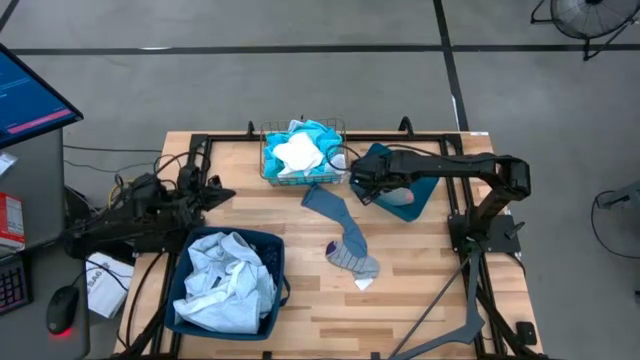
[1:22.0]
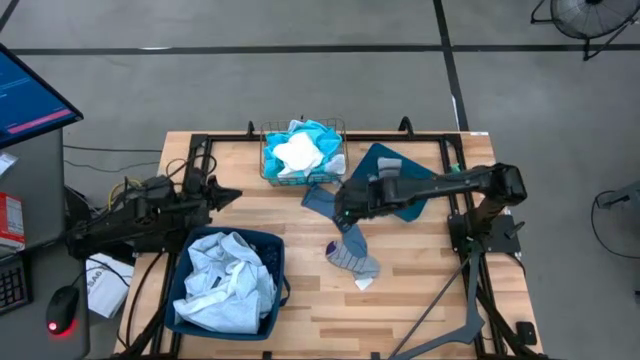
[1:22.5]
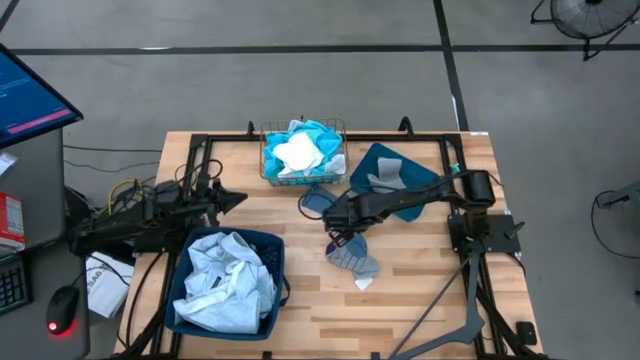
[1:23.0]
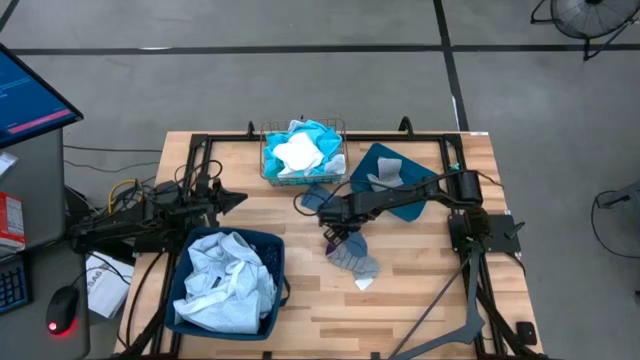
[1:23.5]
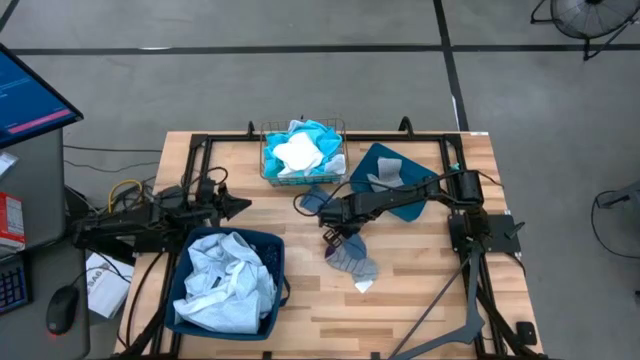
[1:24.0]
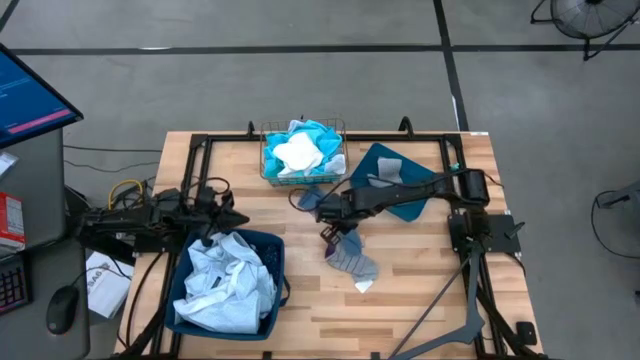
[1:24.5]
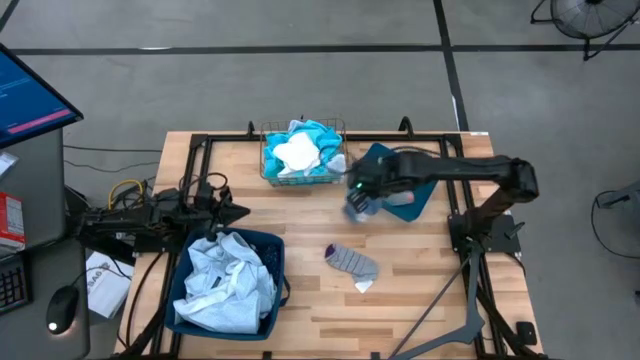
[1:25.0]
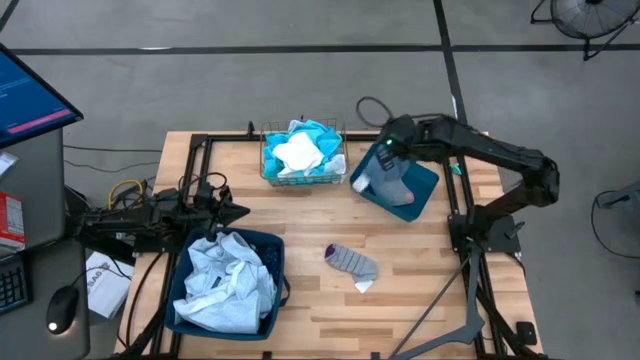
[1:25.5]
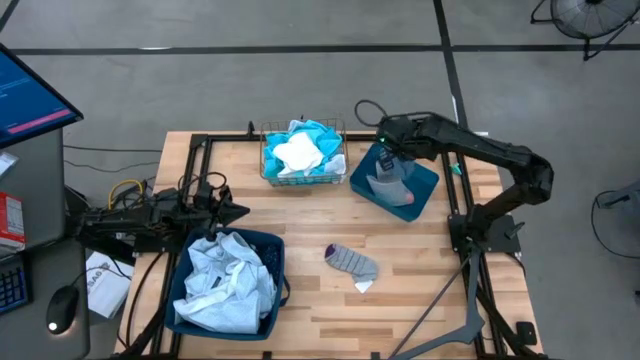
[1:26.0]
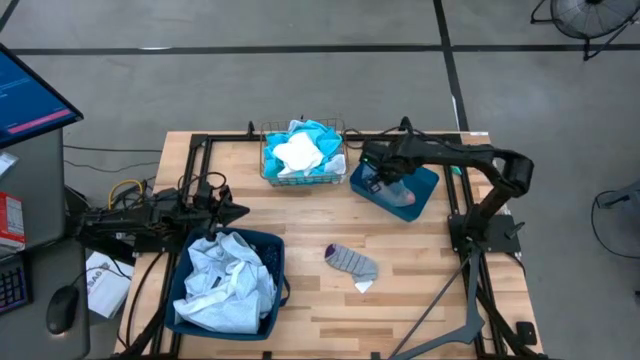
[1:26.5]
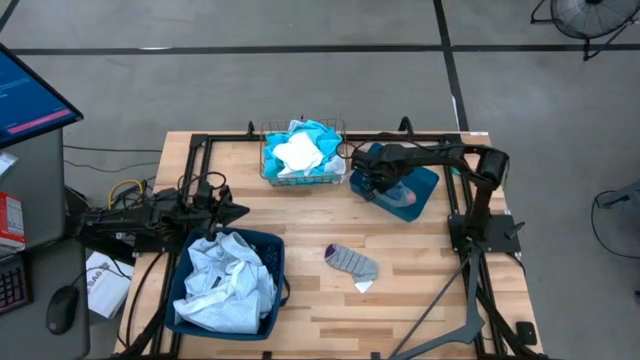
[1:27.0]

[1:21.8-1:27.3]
Task: Pick & Place Cloths
Put the blue sock into the blue bin

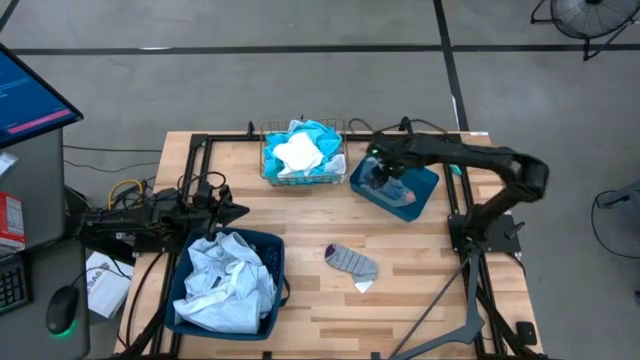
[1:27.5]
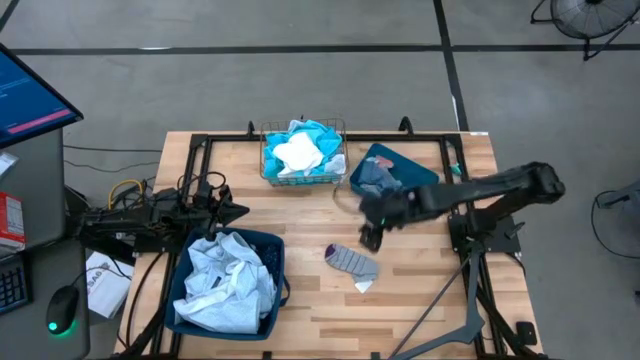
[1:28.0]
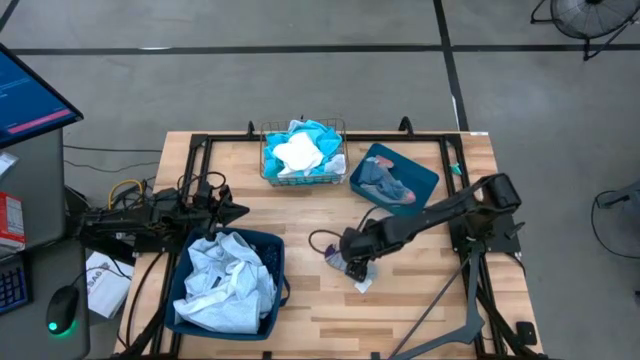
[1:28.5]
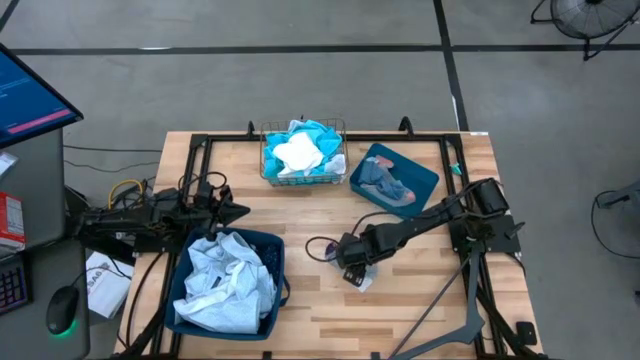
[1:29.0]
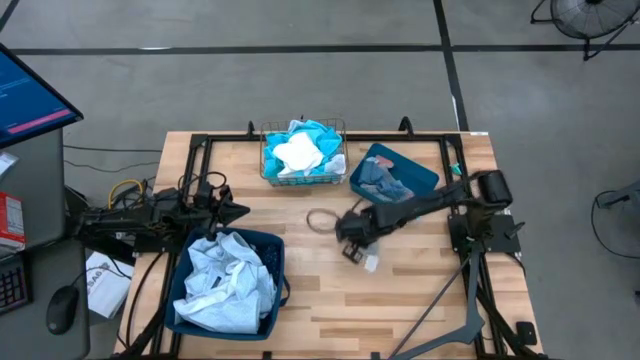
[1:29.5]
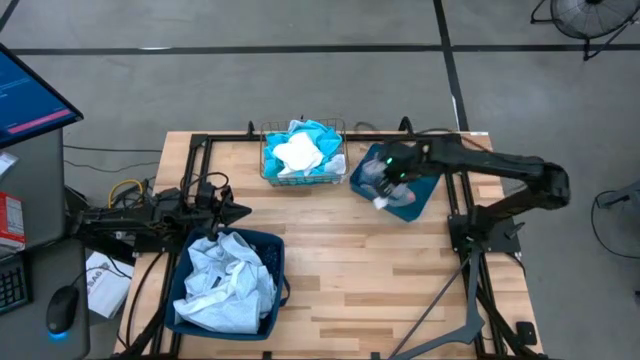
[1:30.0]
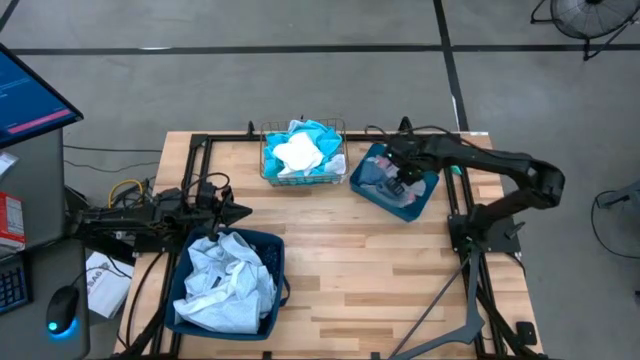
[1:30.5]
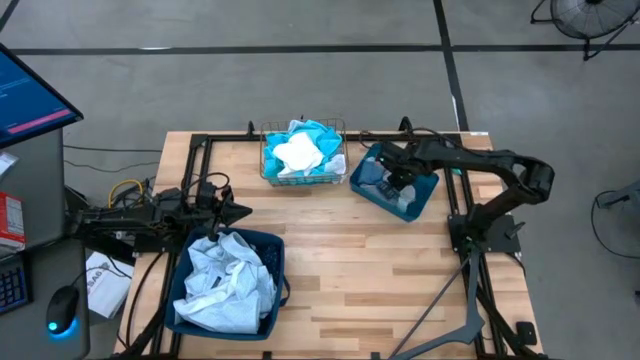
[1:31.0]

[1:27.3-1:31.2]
Put the gray sock into the blue bin

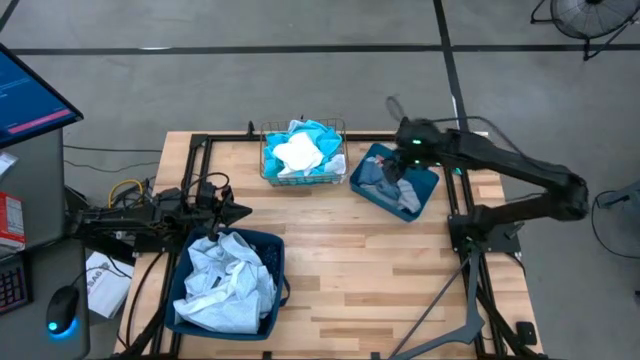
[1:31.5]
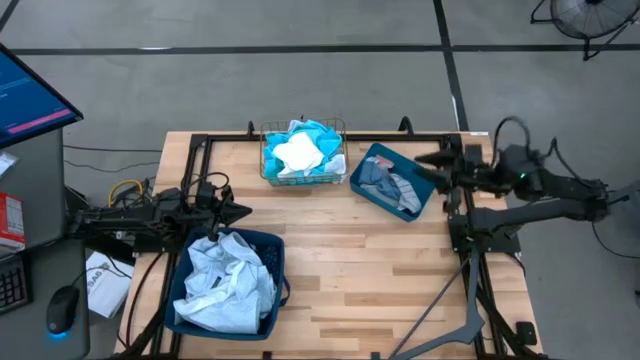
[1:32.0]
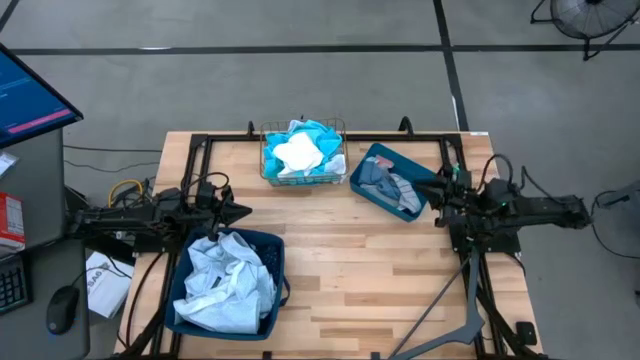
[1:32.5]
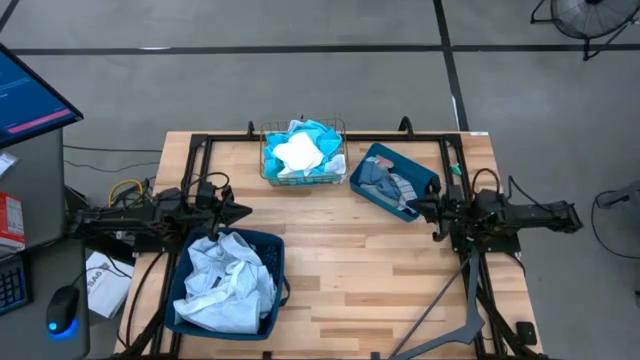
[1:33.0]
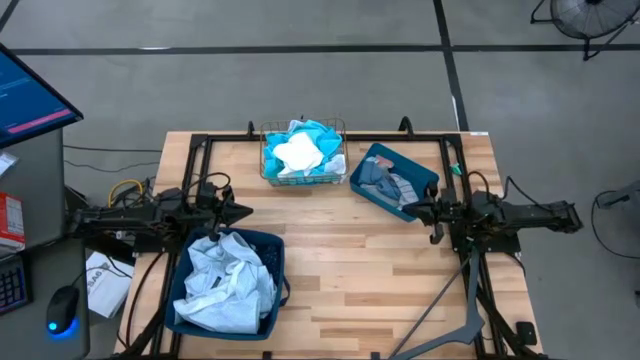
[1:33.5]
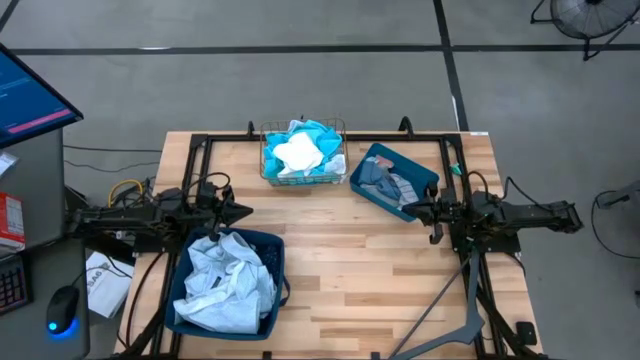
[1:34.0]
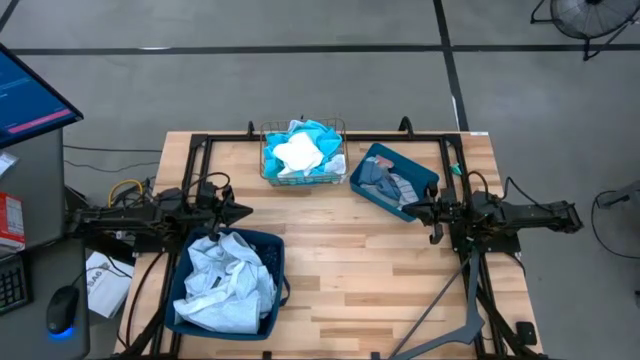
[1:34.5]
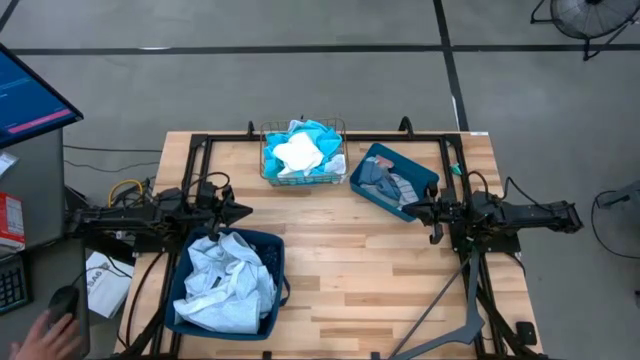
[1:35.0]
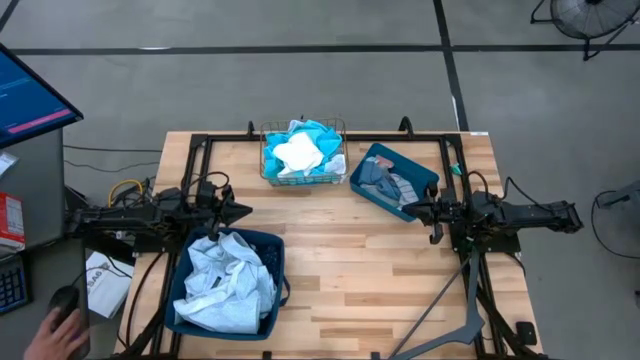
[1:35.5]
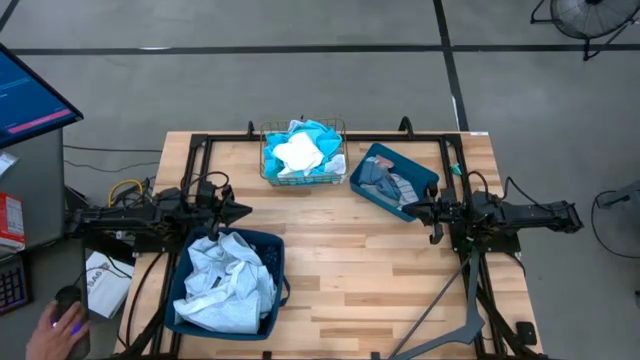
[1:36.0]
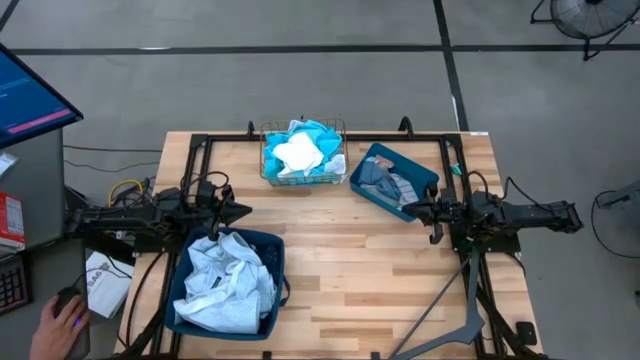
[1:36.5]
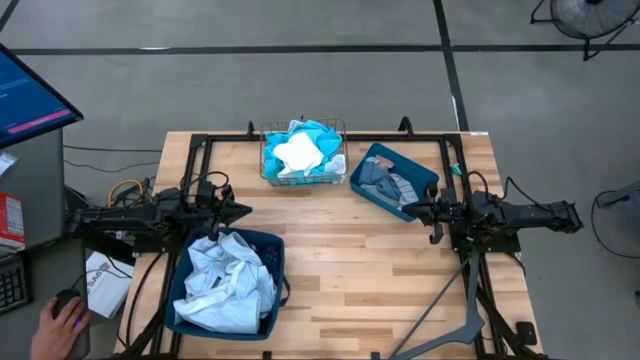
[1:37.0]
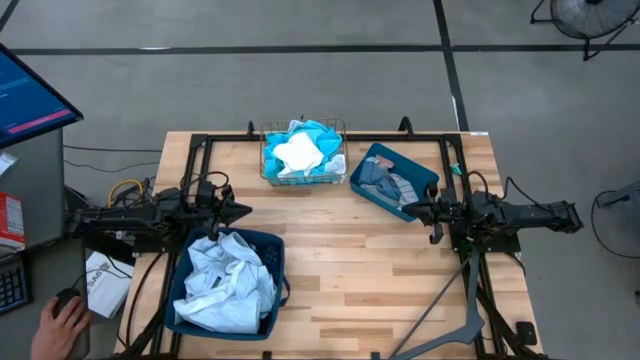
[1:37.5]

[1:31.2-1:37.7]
Return to Home Position

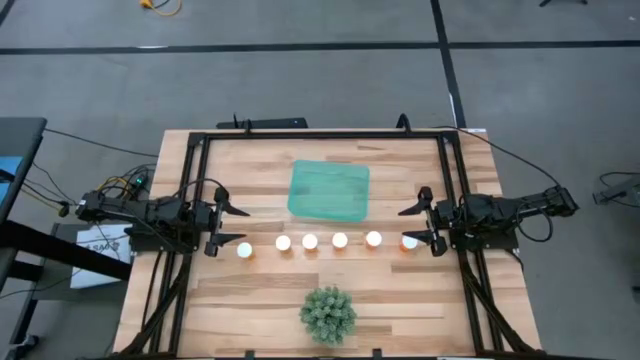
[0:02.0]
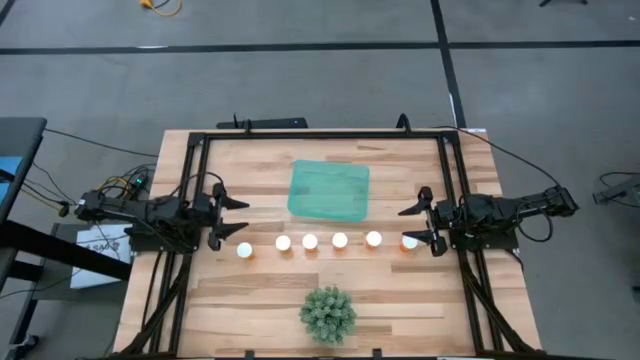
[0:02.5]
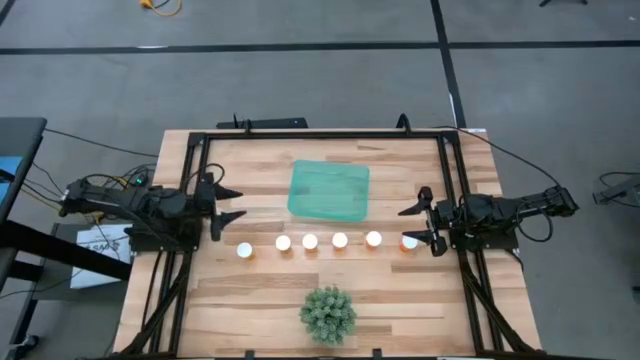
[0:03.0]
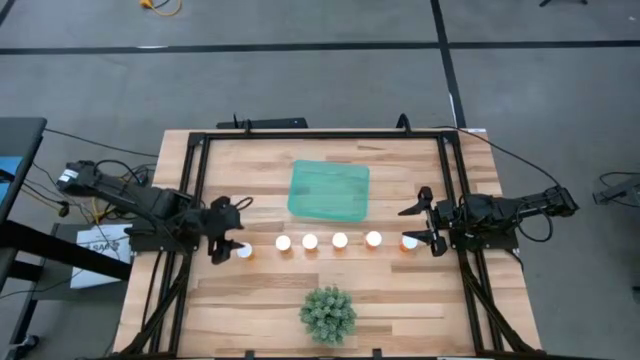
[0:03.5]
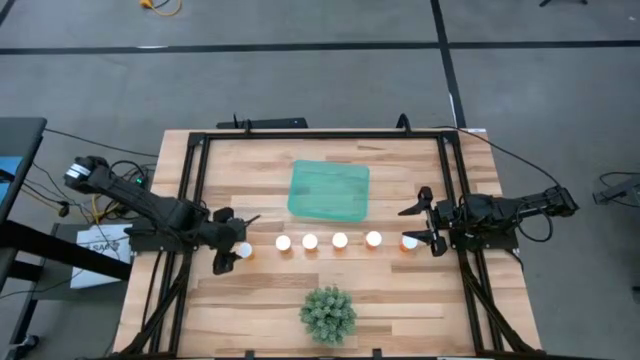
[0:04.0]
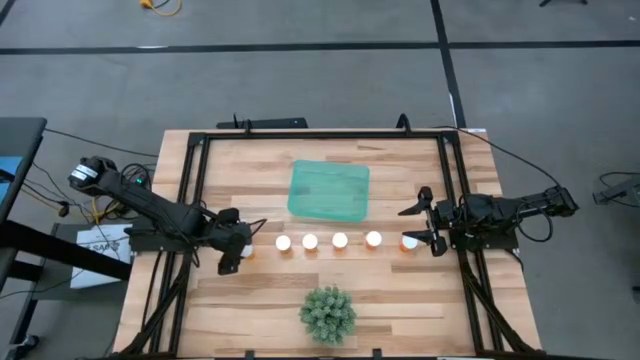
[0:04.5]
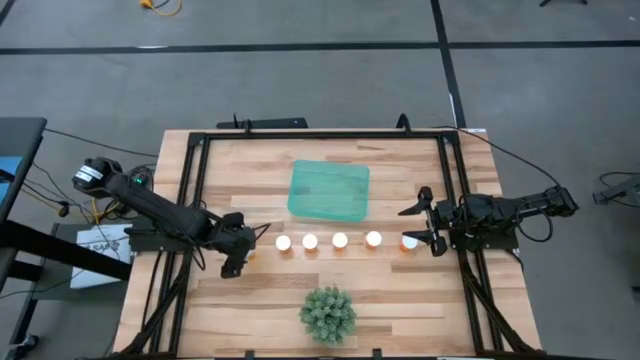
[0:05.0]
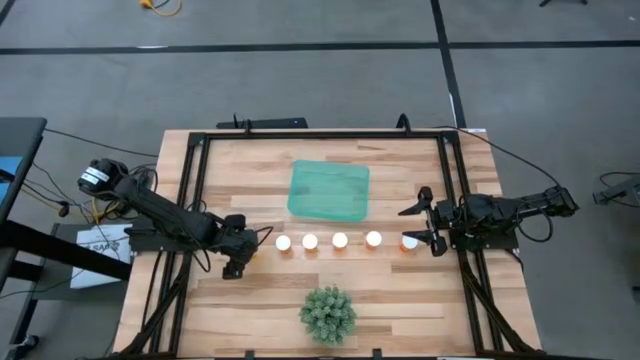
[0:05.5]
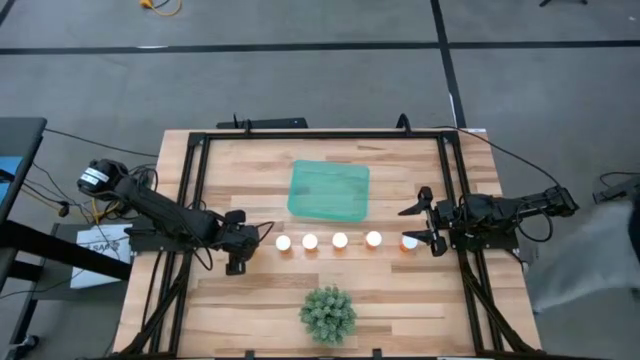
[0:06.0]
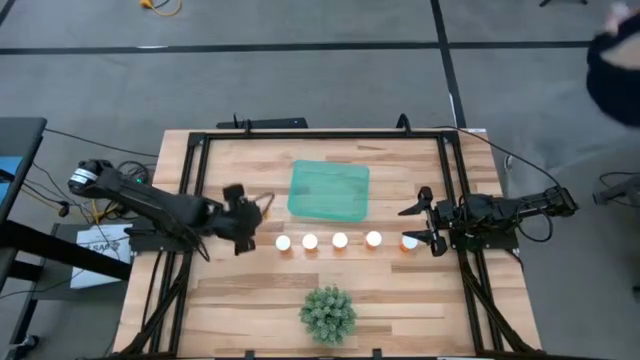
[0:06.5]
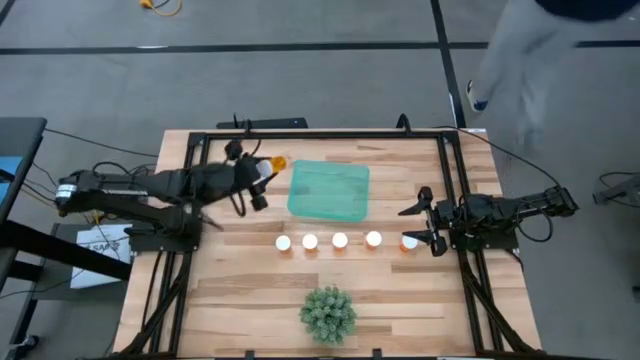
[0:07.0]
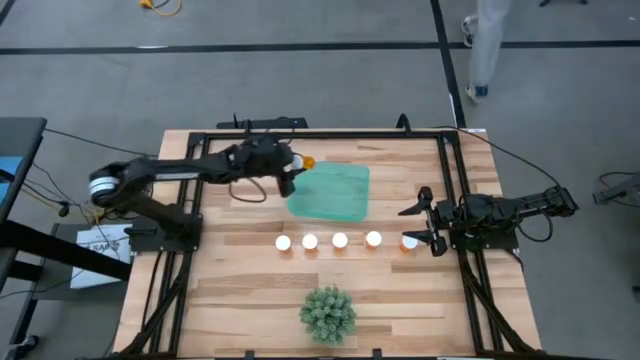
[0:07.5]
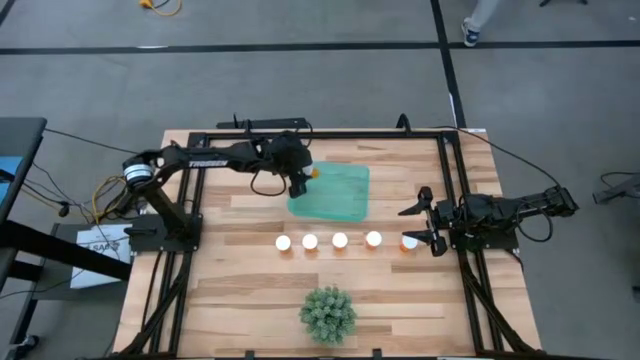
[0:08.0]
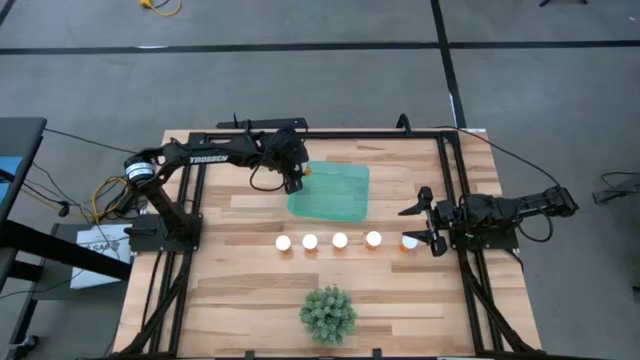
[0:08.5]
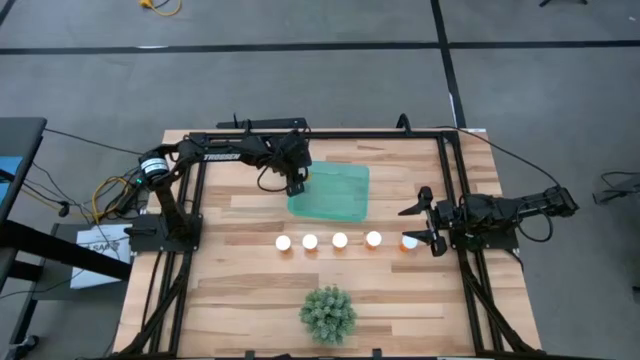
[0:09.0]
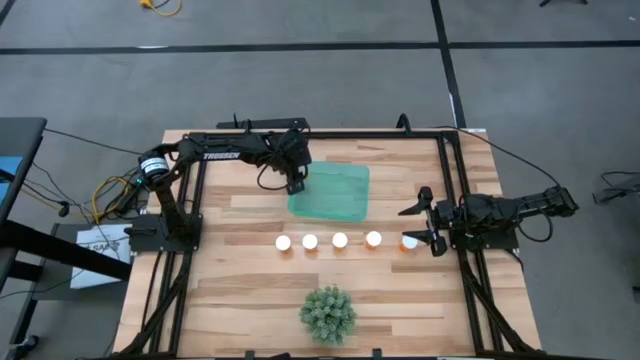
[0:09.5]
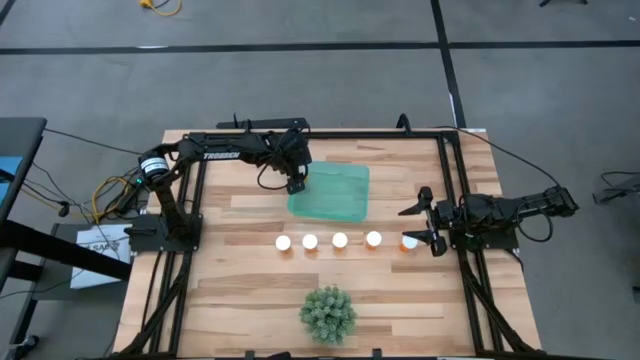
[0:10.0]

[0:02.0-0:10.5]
Task: Pick and place pill bottles into a basket
Put the orange pill bottle into the green bin
